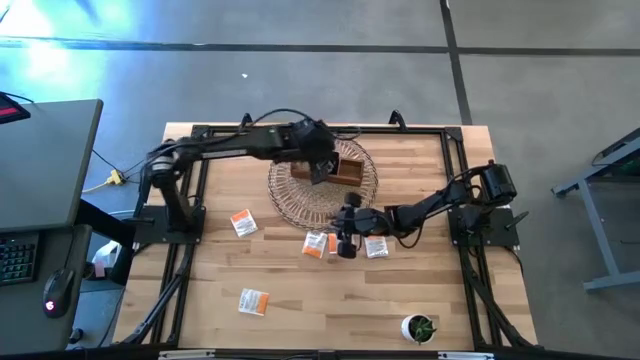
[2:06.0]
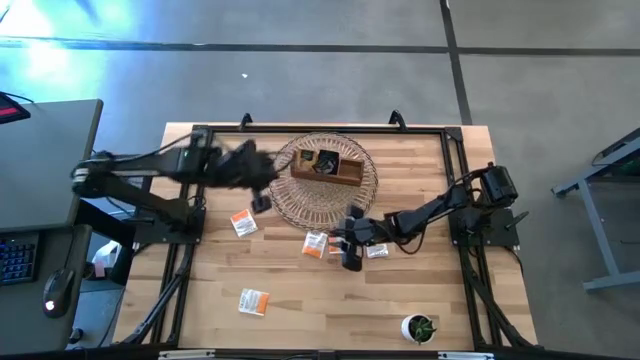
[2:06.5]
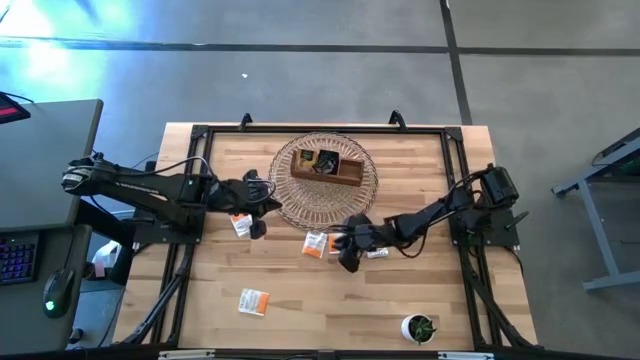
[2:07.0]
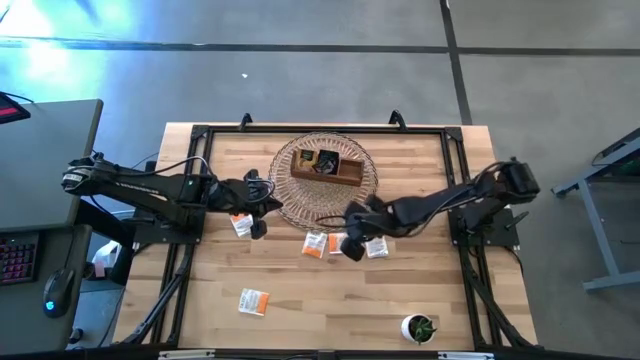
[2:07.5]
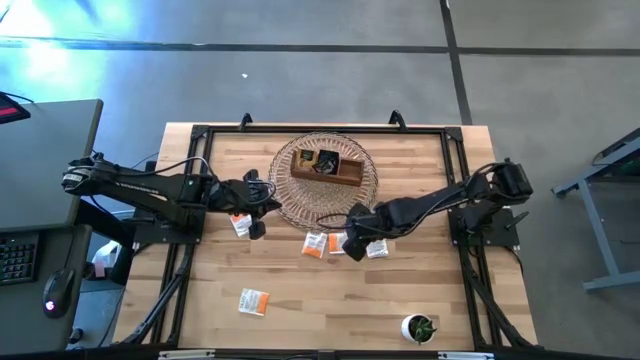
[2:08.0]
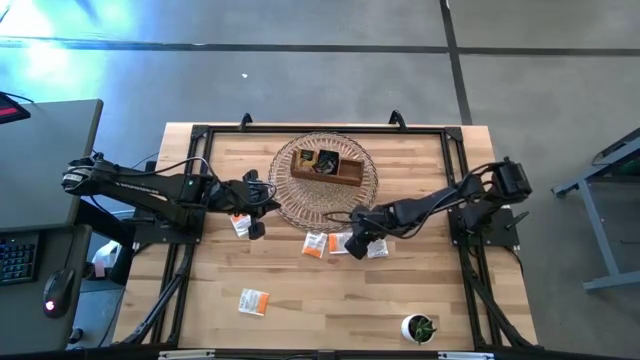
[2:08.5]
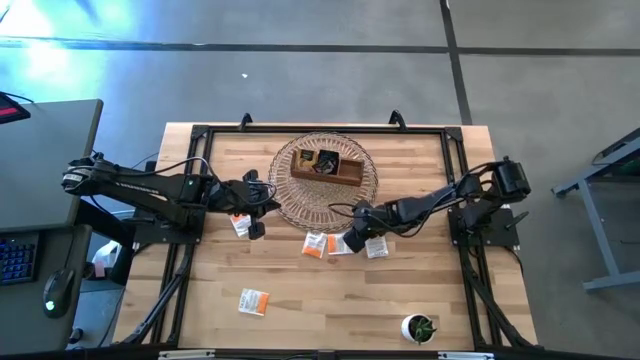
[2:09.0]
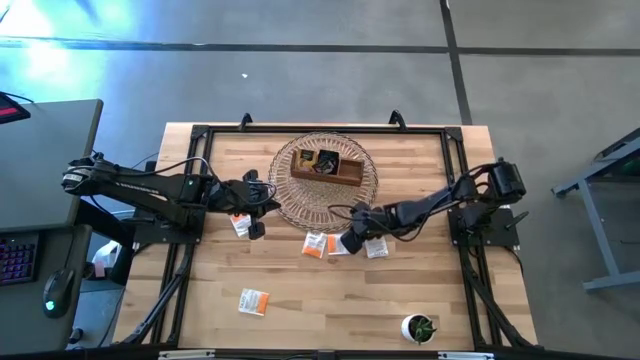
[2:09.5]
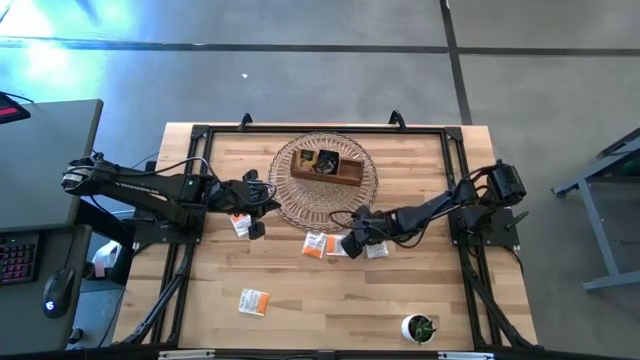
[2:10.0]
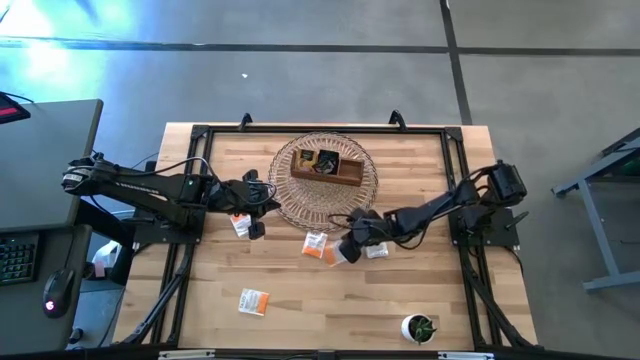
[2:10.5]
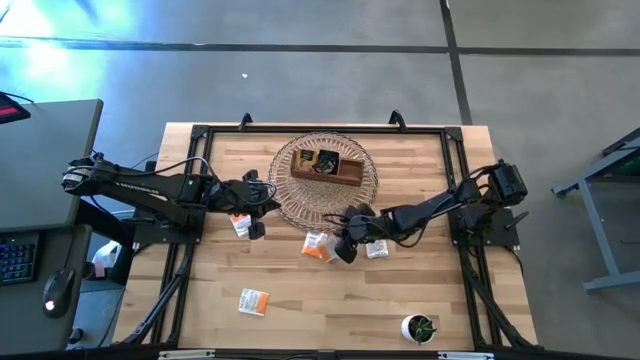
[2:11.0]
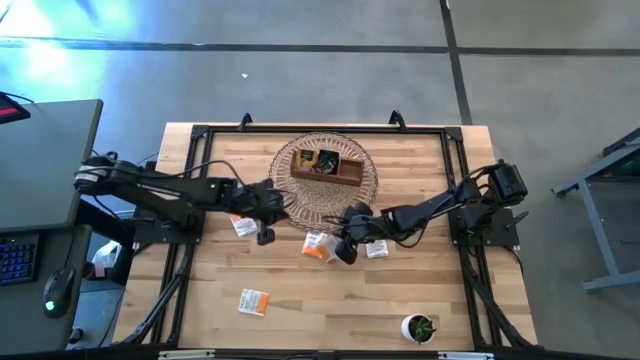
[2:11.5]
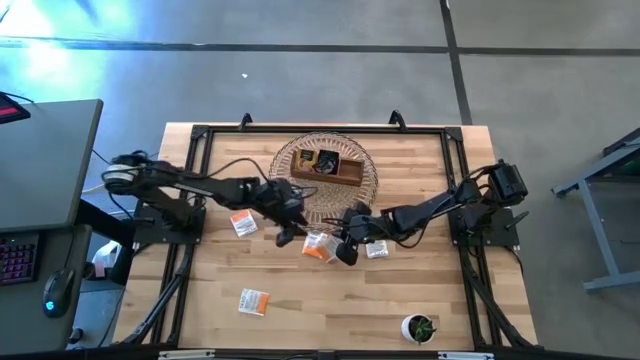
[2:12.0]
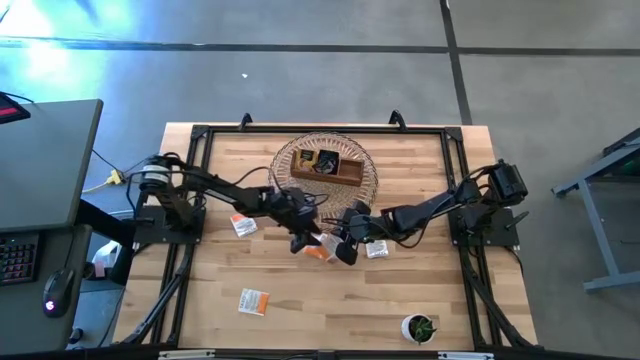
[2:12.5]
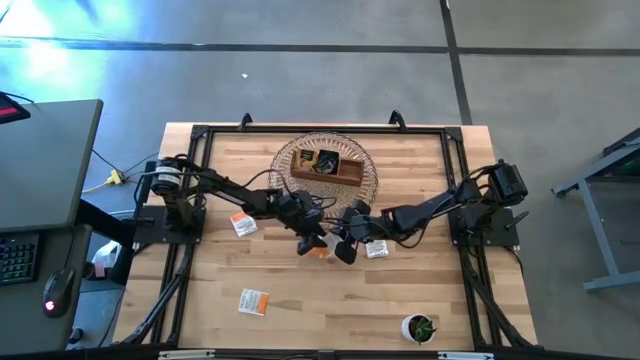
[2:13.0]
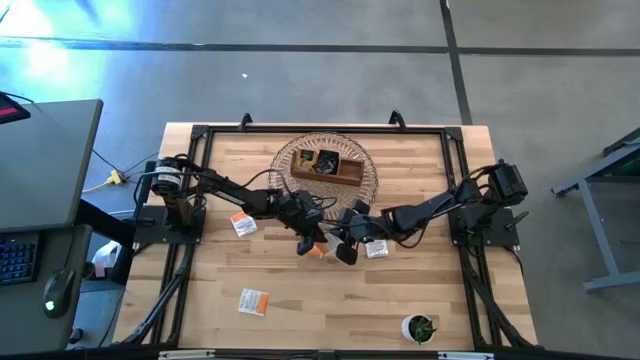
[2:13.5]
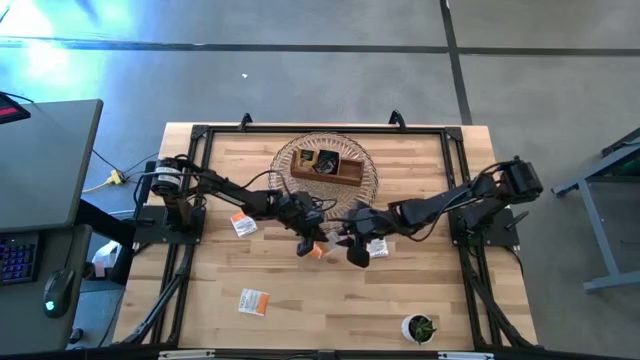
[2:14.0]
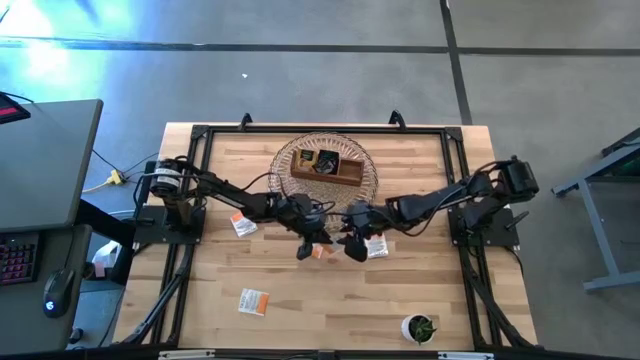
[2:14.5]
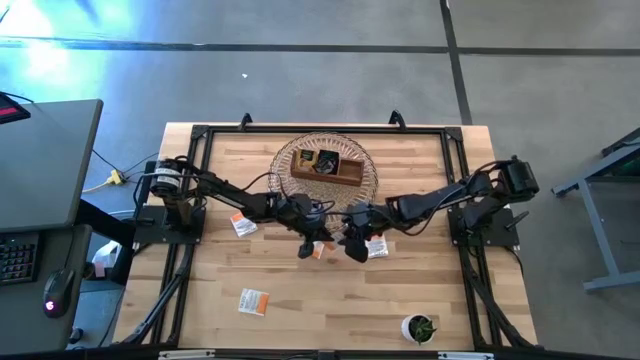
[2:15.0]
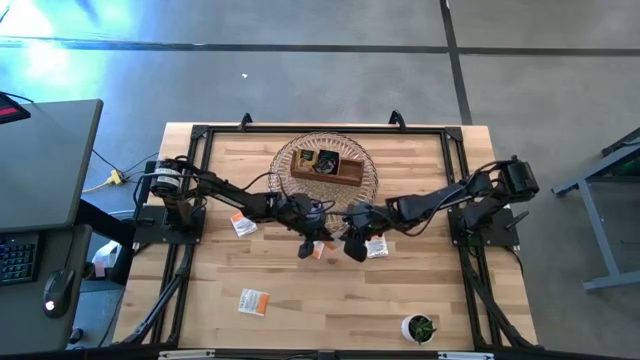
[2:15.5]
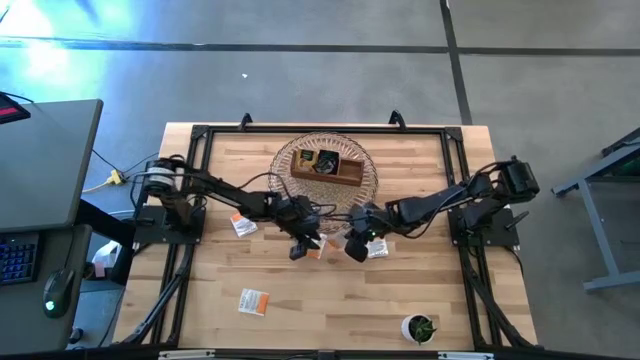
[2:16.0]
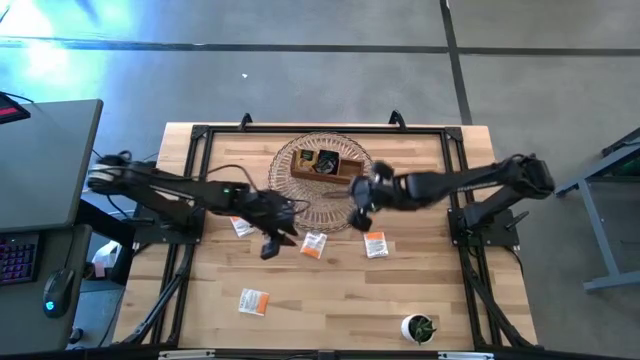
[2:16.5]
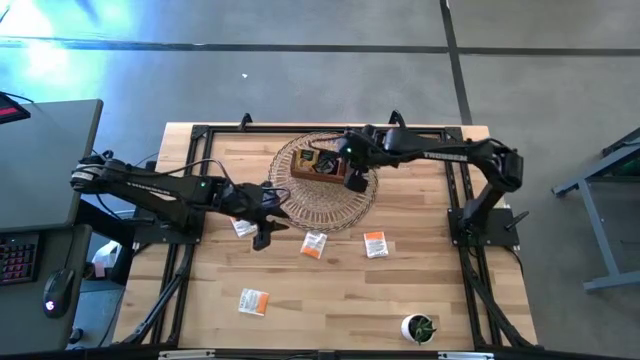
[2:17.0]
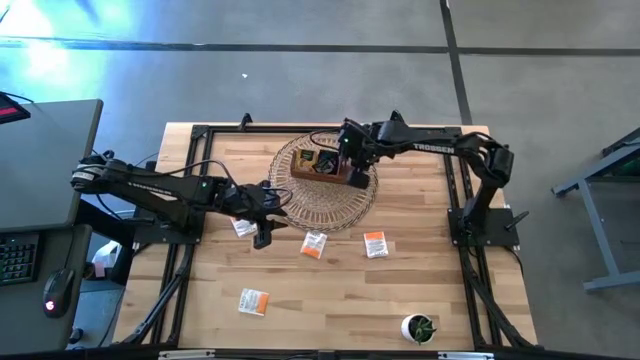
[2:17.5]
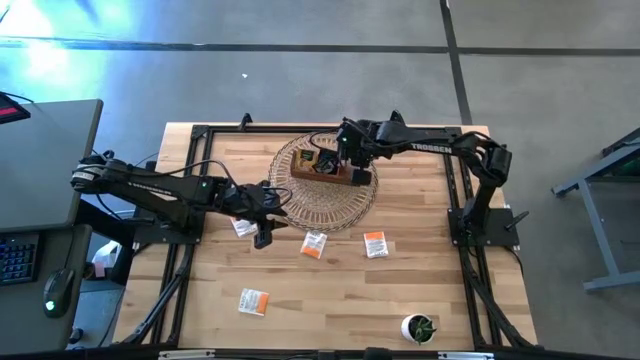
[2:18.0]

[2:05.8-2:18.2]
Task: Pick & Place Tea
Put the white tea bag into the right section of the wooden organizer

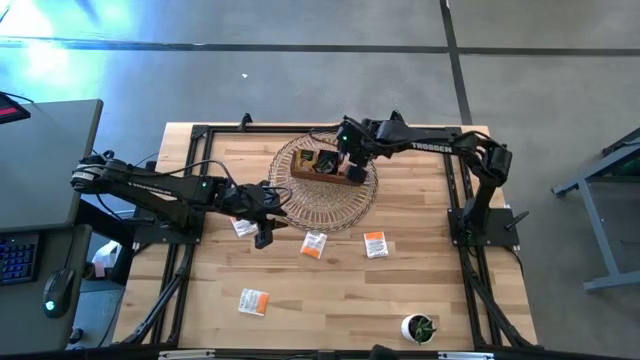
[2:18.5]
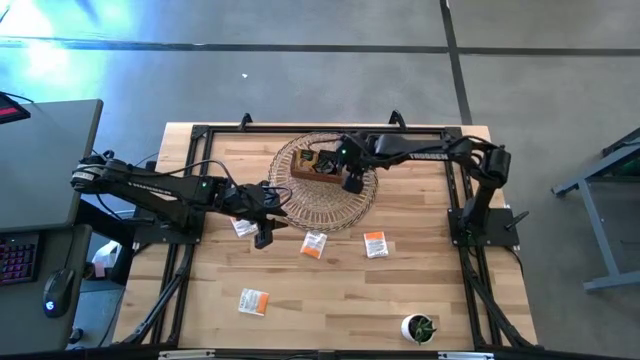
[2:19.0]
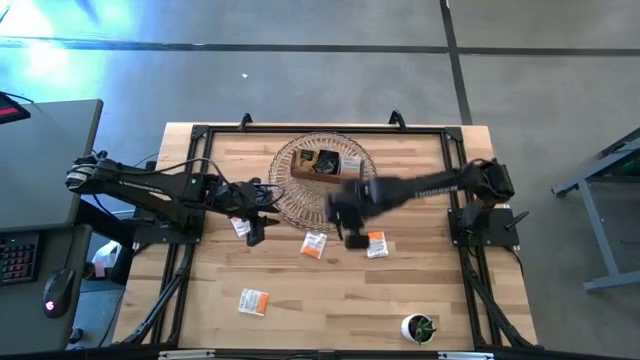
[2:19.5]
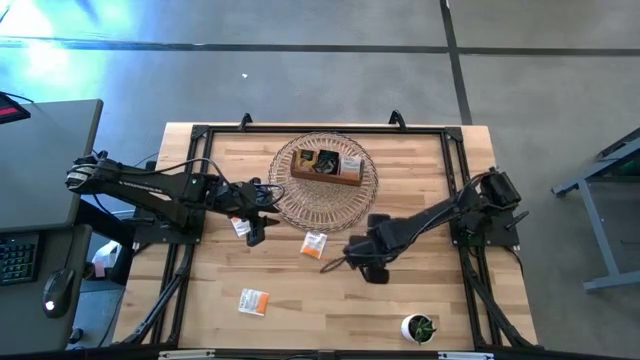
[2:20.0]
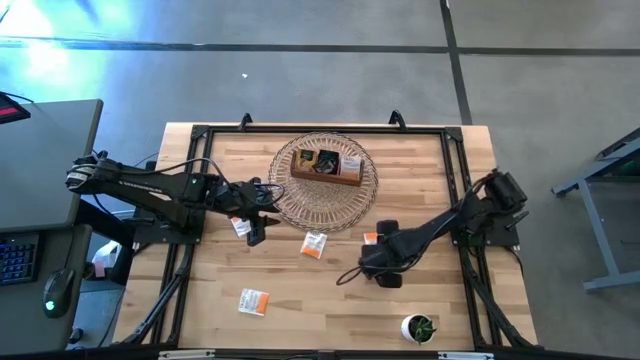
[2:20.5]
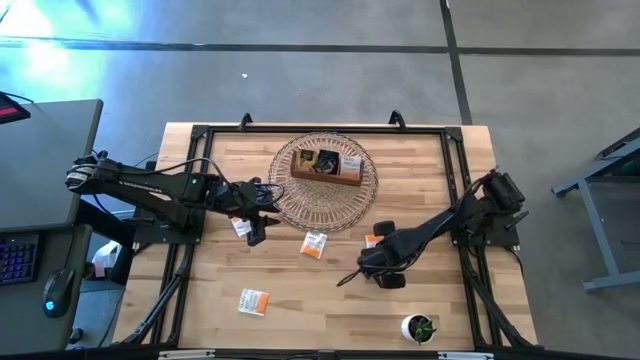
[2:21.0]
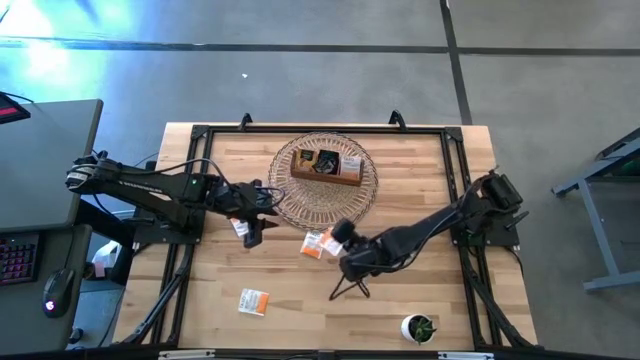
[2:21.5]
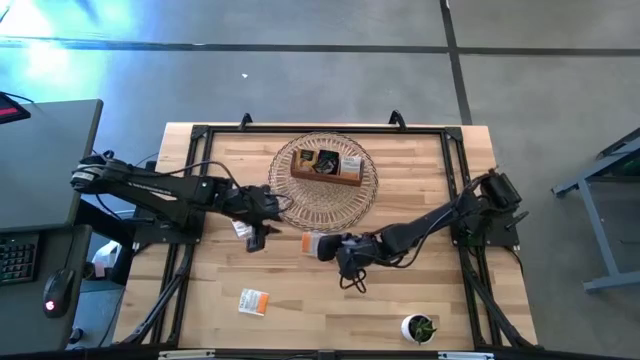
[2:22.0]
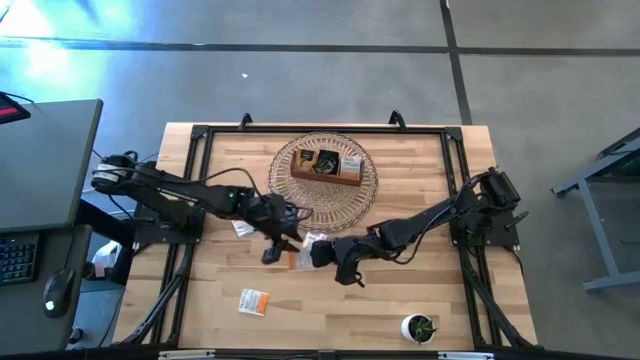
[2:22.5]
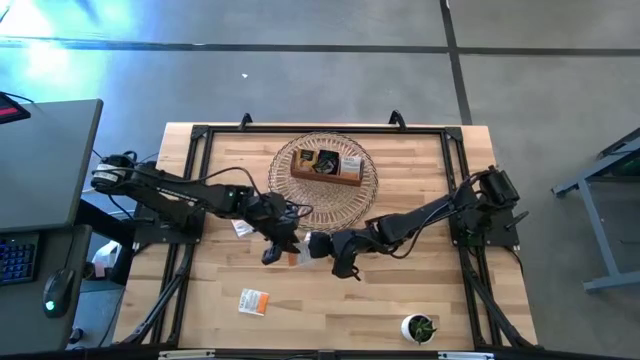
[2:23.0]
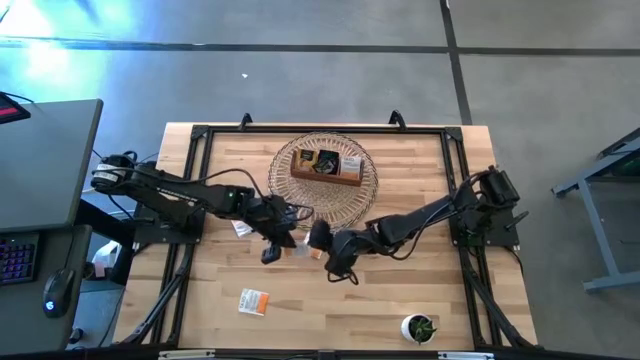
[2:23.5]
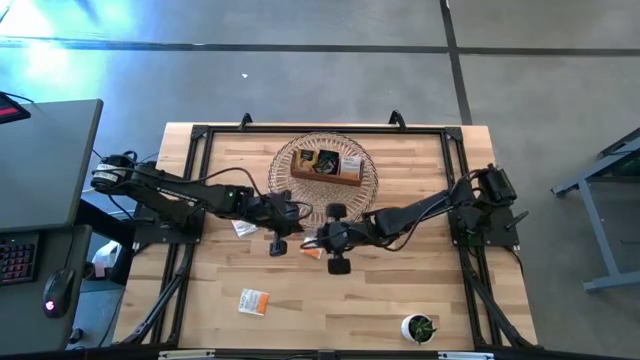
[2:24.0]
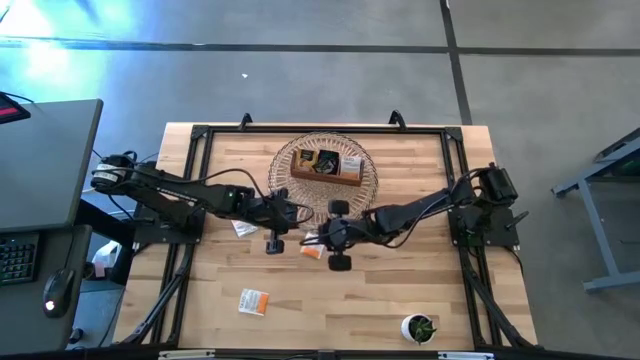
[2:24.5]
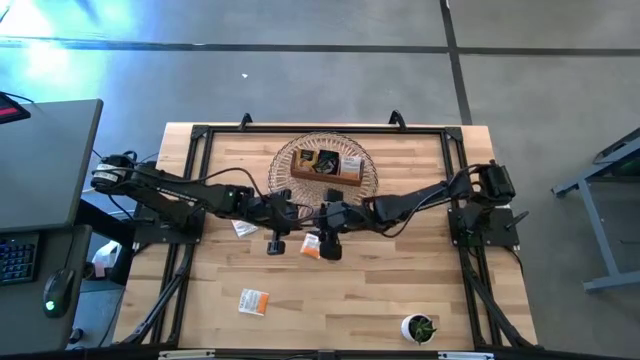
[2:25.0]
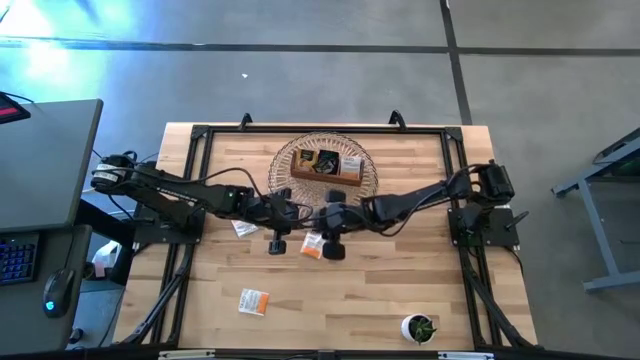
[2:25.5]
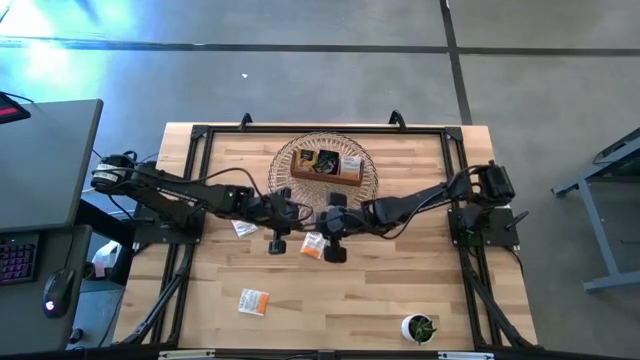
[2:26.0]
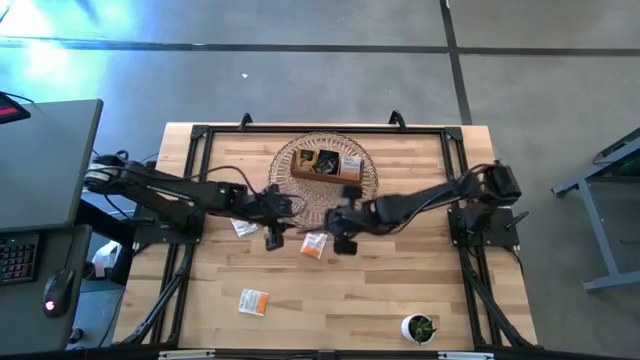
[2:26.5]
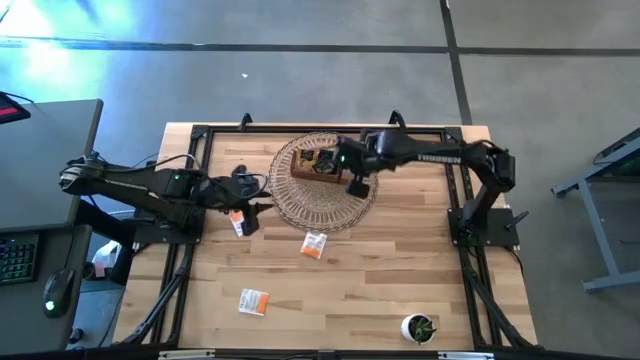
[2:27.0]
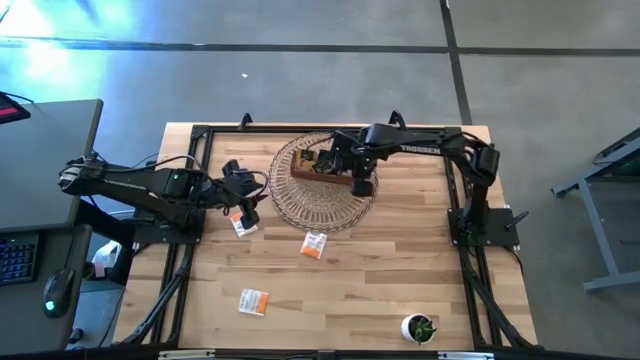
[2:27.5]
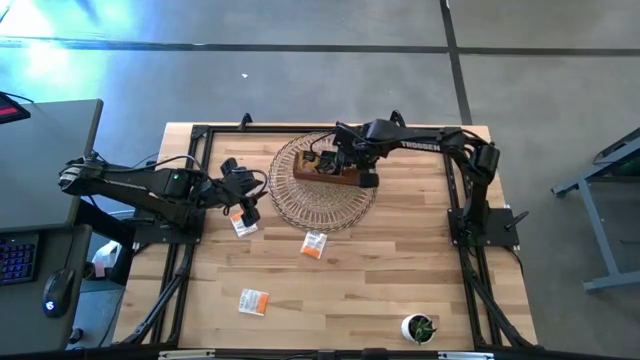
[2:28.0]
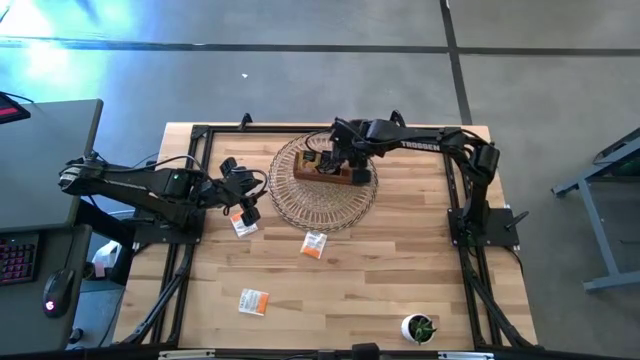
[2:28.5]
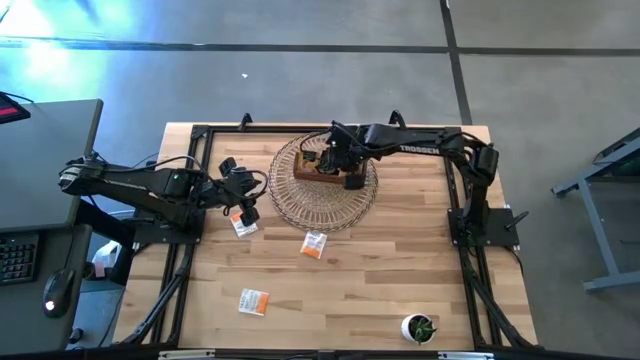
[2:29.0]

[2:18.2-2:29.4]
Put the white tea bag into the right section of the wooden organizer
